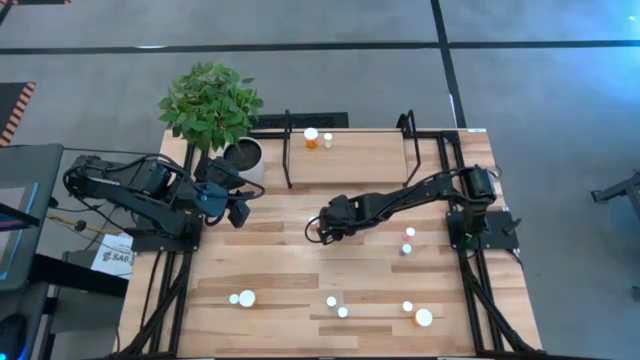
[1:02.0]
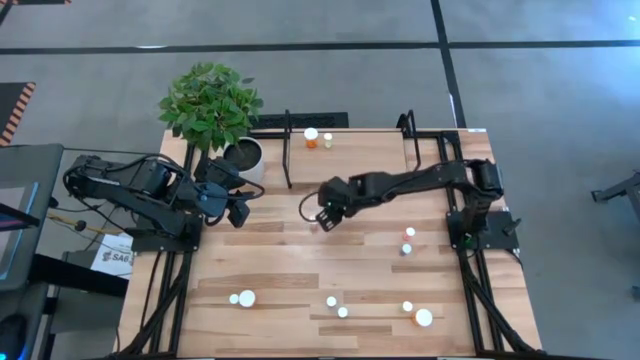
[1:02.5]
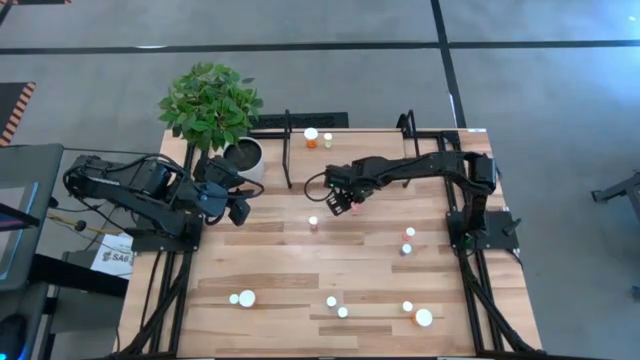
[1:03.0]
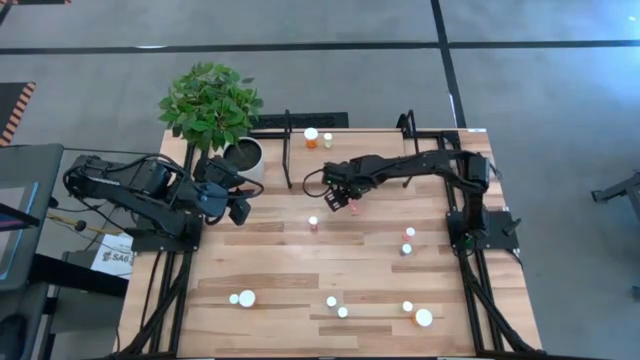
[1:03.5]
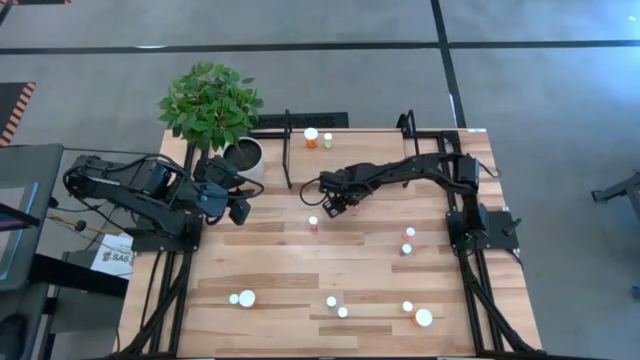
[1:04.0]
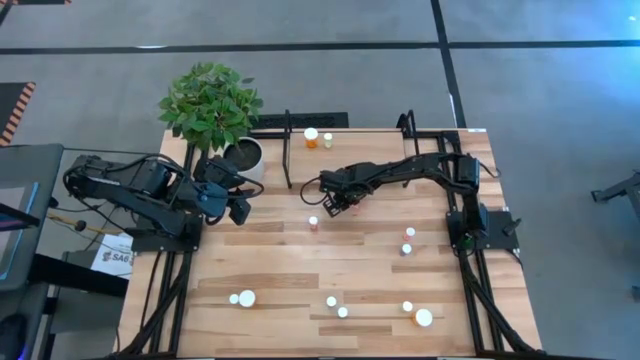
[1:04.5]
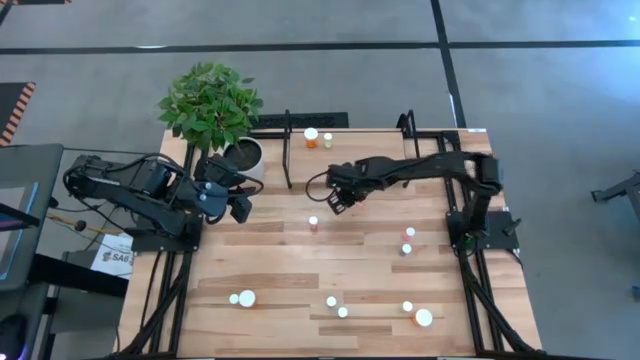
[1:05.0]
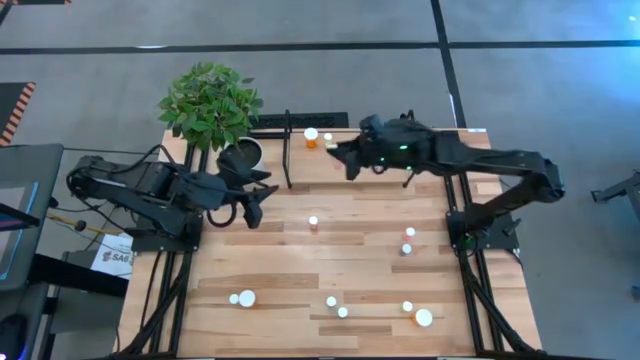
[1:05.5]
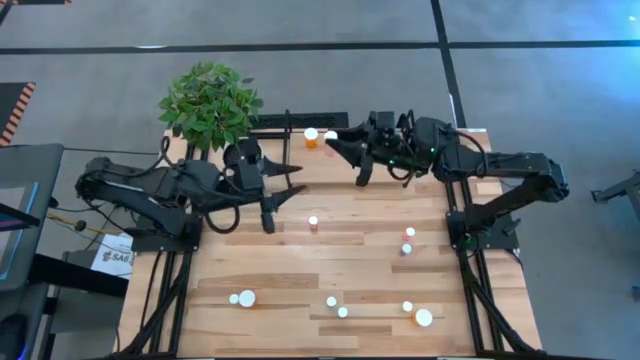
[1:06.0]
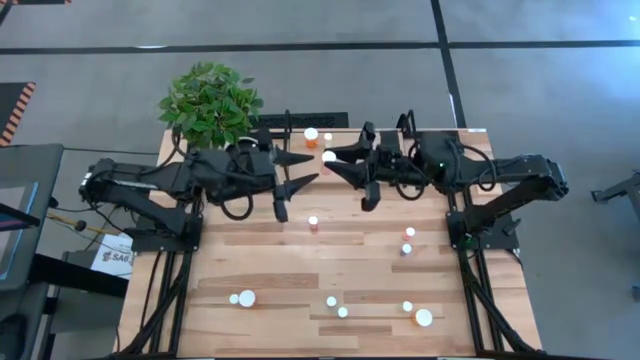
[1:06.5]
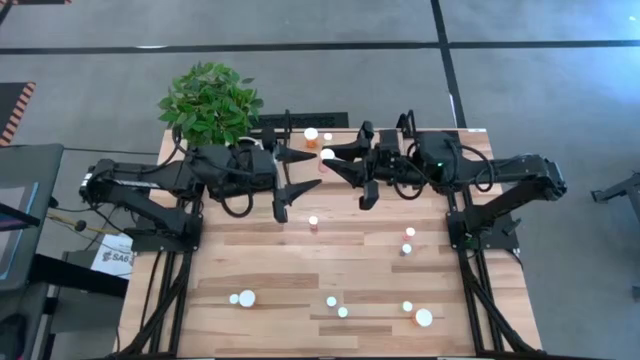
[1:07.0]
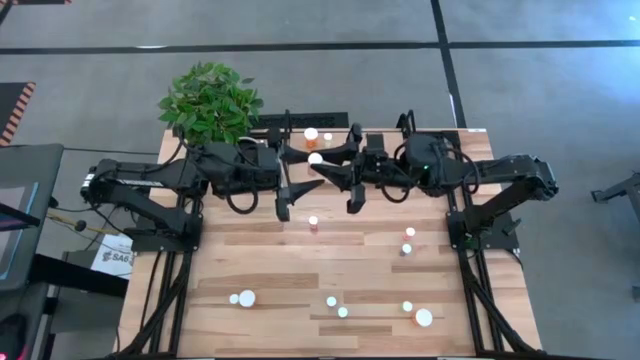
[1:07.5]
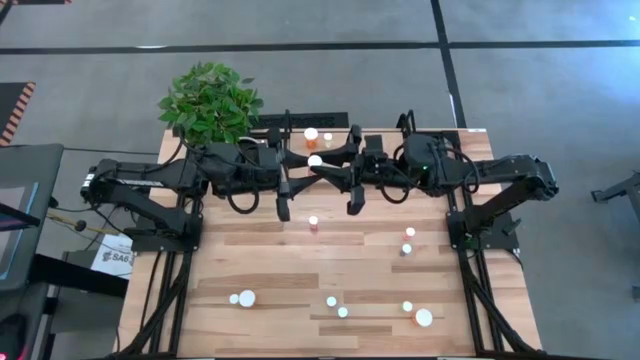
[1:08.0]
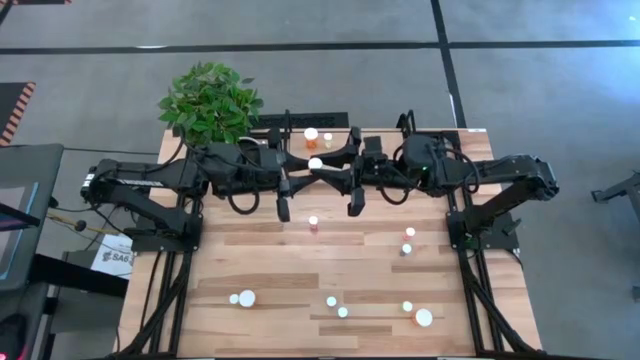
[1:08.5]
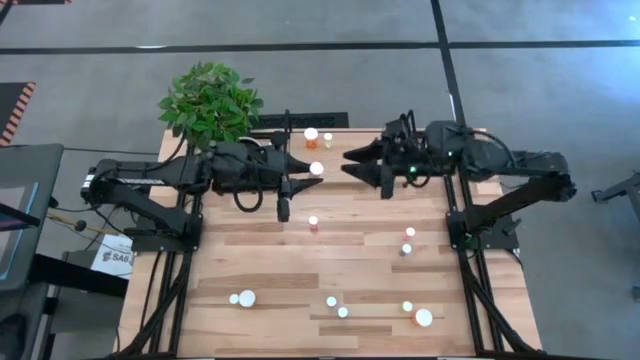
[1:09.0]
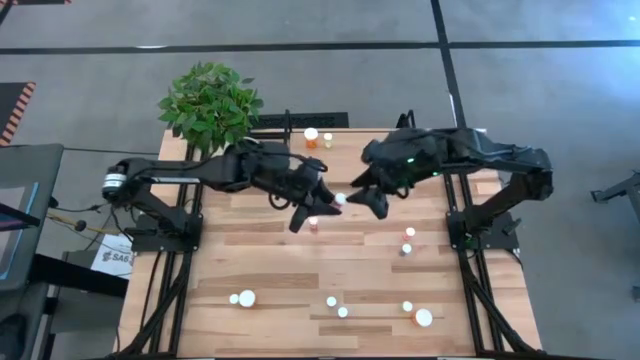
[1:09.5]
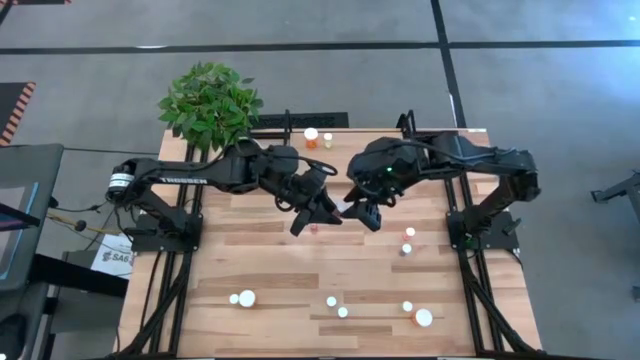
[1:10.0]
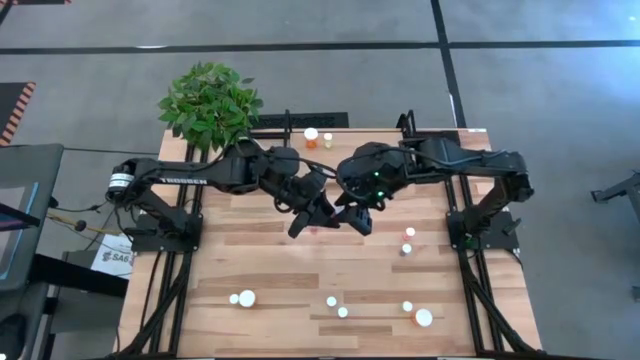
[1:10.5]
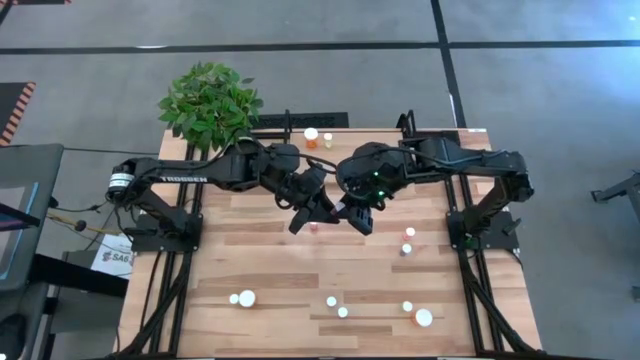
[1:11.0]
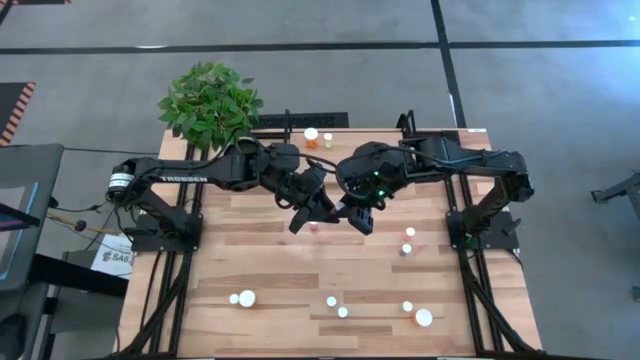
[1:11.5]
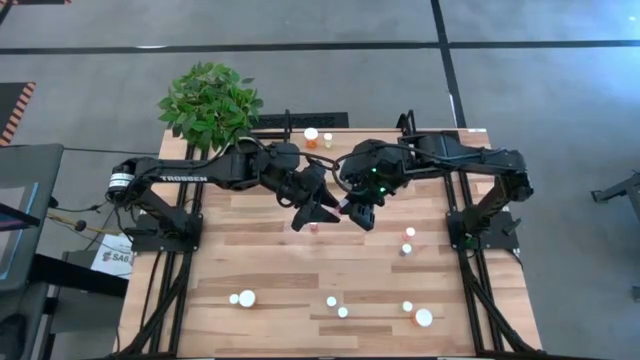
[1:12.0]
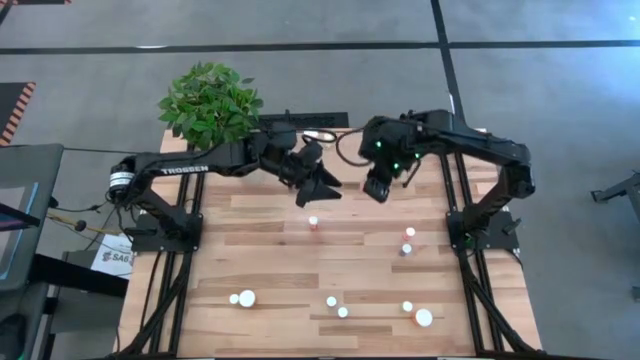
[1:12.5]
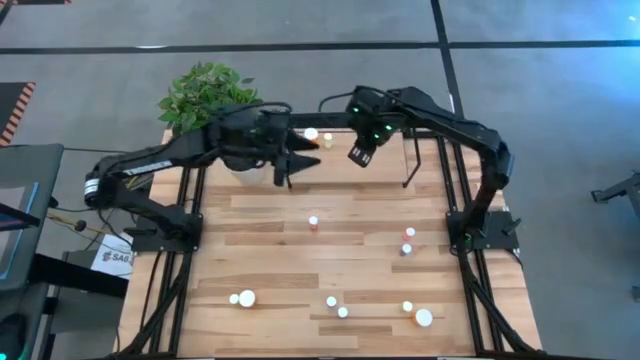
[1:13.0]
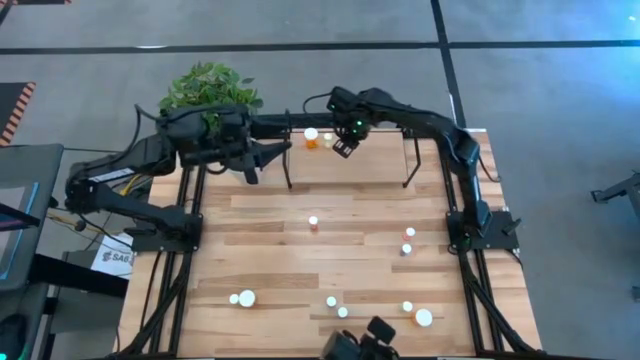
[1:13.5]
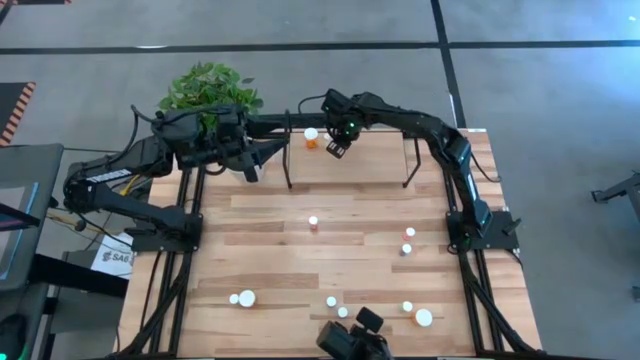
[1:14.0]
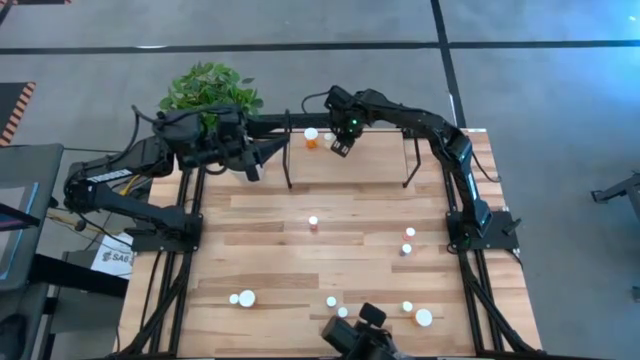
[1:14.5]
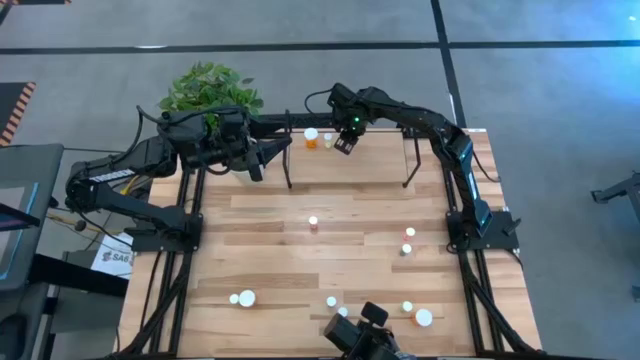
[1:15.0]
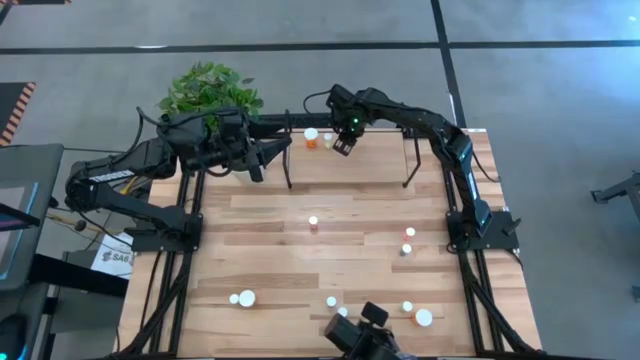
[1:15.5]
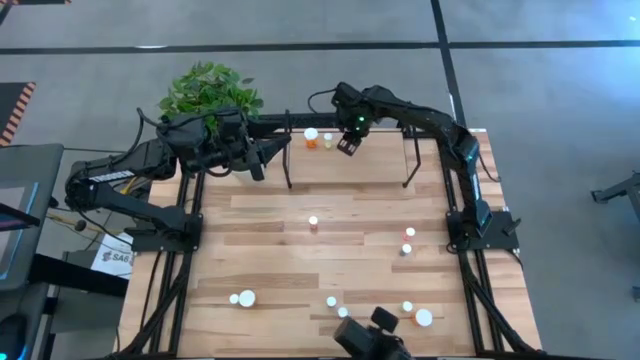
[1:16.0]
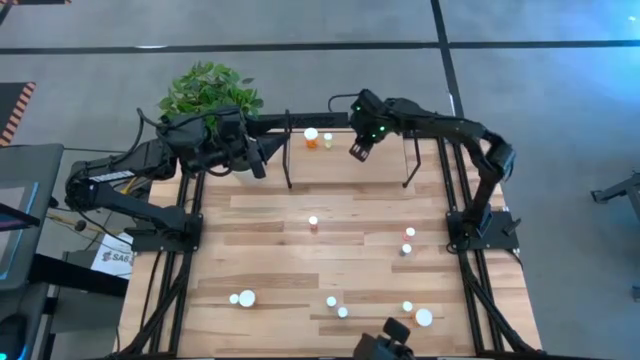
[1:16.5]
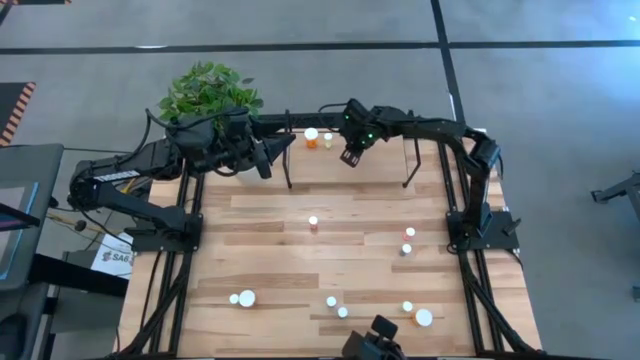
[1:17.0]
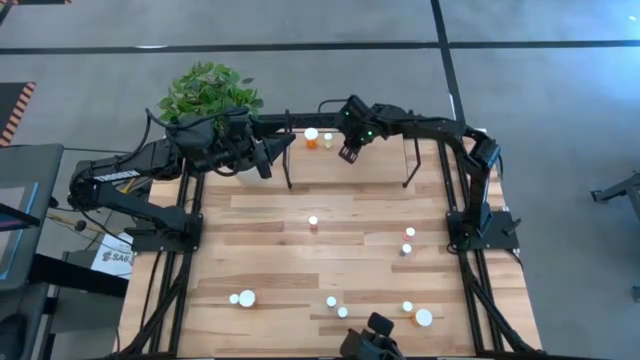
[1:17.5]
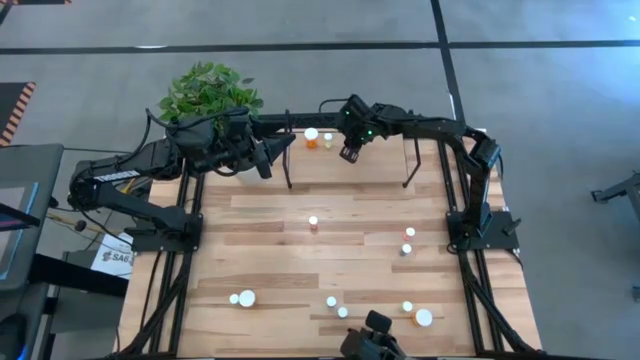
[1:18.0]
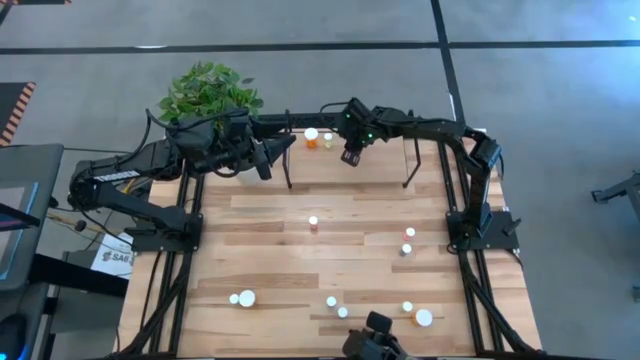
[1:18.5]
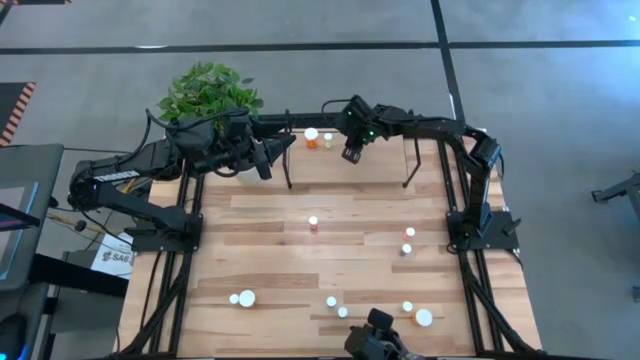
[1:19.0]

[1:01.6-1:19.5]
Task: Pick and place medicine bottles onto shelf by color
Put the top pink pill bottle on the shelf

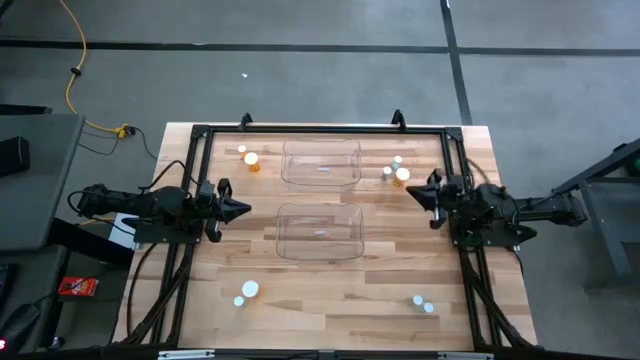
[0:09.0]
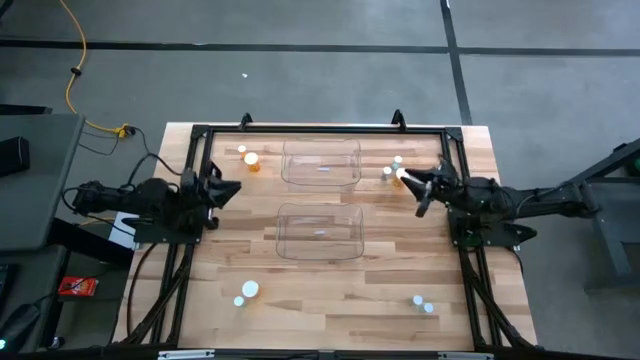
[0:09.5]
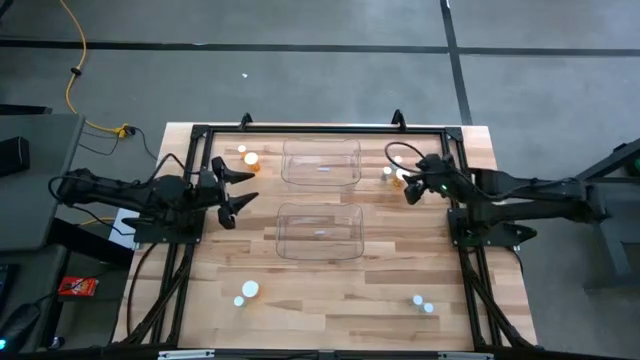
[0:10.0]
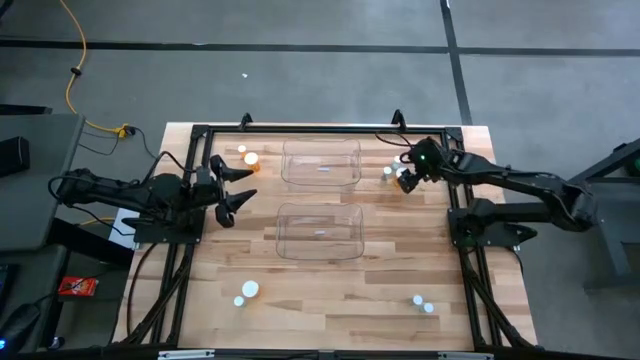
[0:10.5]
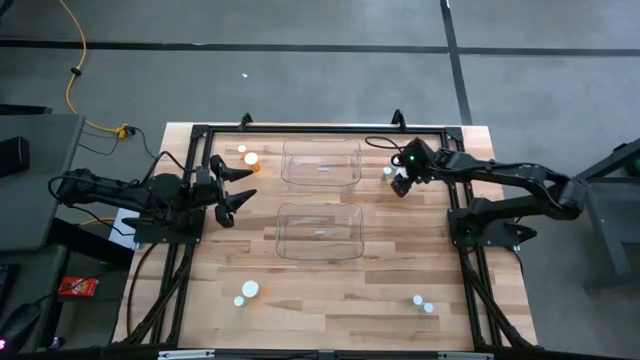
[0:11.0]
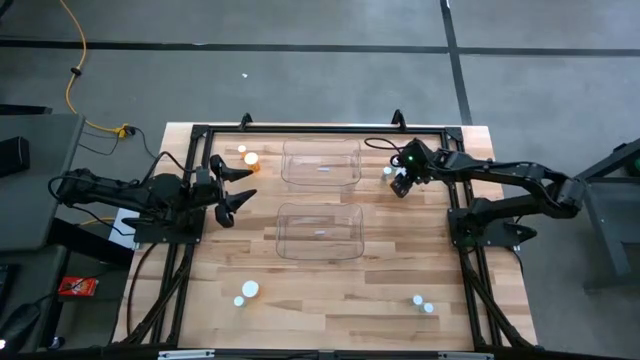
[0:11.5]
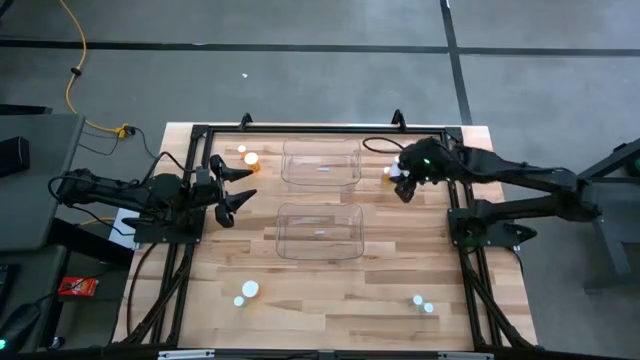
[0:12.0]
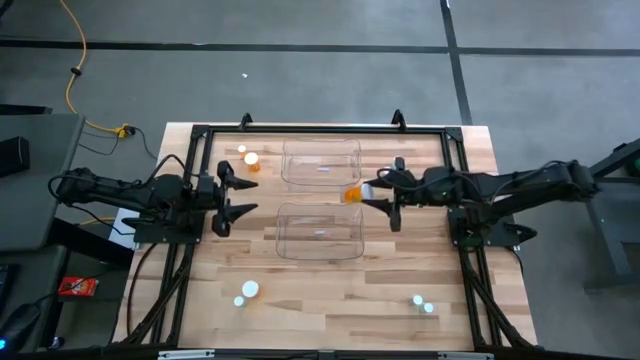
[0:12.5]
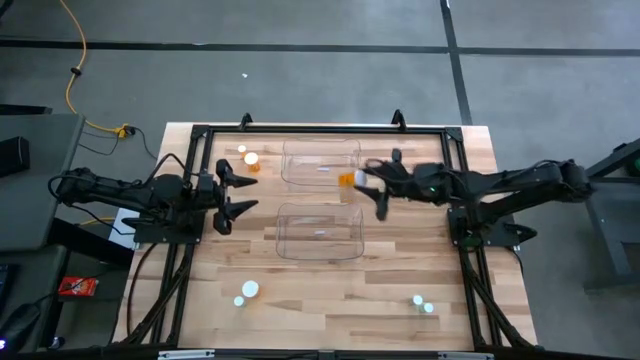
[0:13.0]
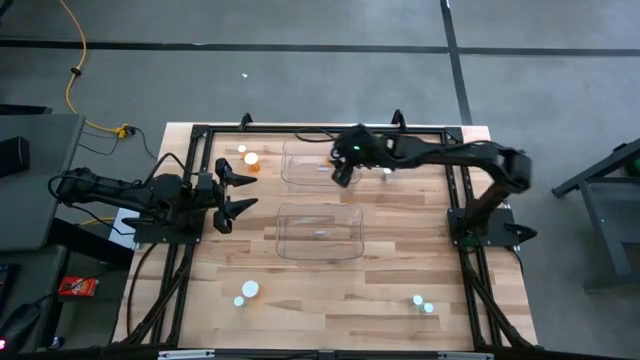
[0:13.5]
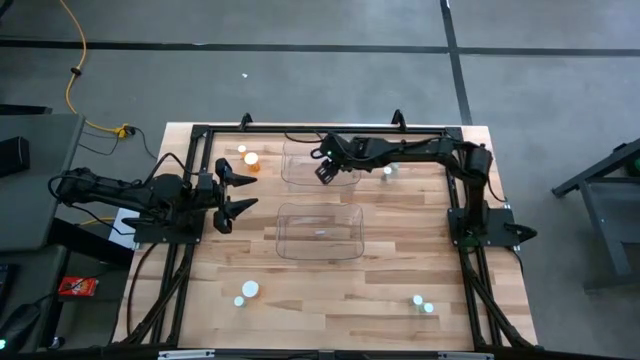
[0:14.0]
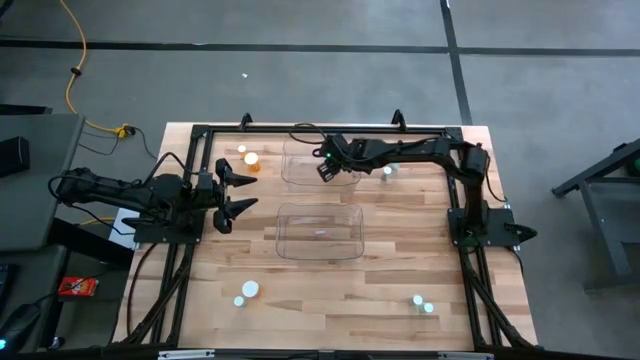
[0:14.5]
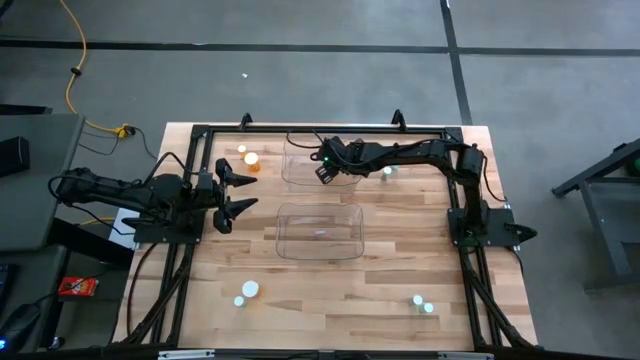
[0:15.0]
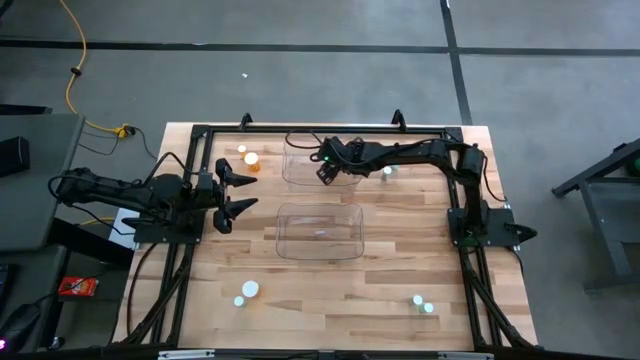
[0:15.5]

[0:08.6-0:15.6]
Task: Pick and place medicine bottles into bin by pill shape (circle, oval)
Put the orange capsule bottle into the top transparent bin
